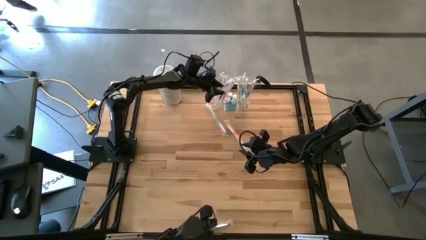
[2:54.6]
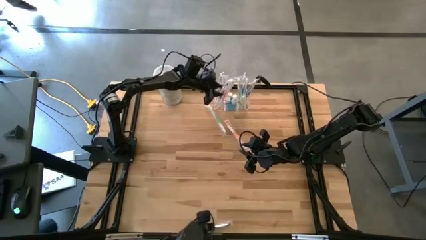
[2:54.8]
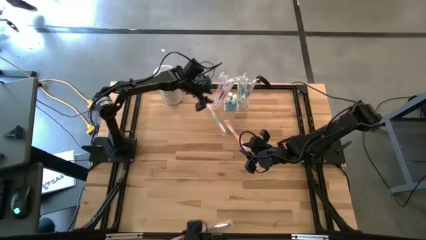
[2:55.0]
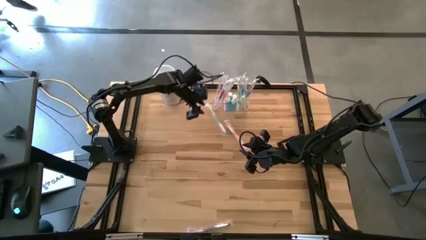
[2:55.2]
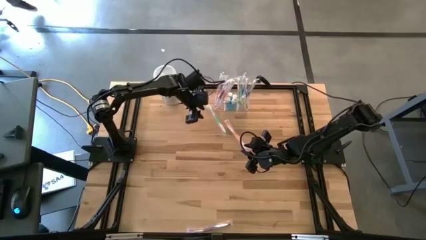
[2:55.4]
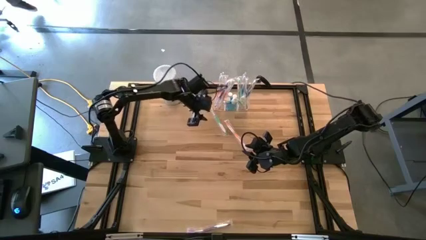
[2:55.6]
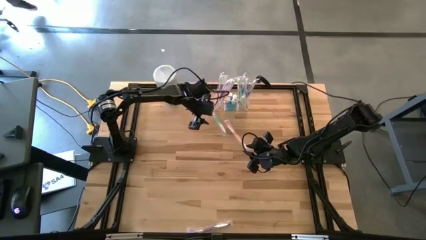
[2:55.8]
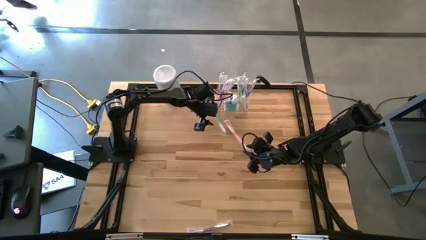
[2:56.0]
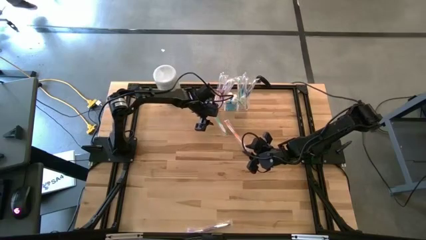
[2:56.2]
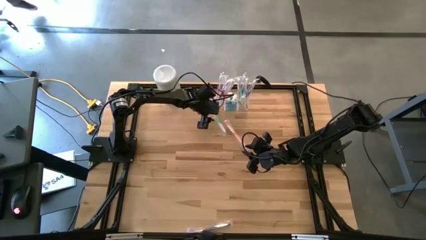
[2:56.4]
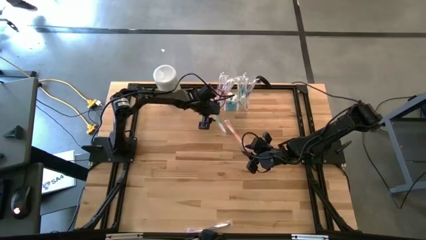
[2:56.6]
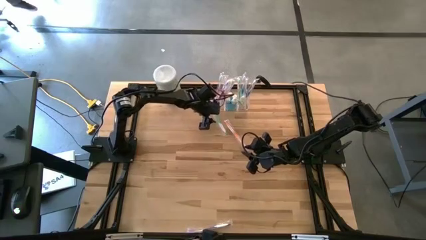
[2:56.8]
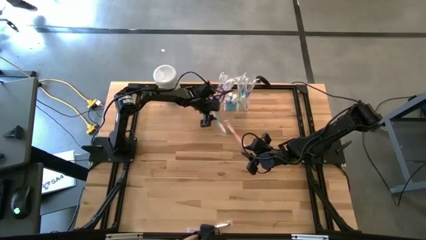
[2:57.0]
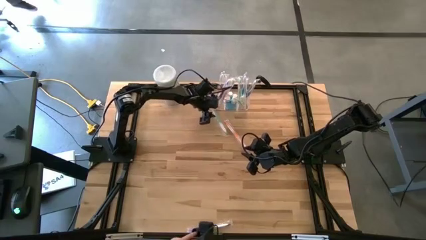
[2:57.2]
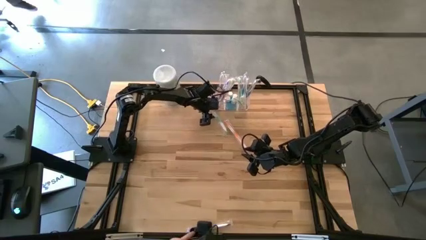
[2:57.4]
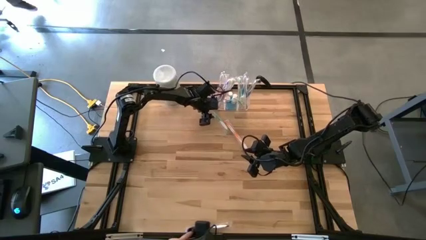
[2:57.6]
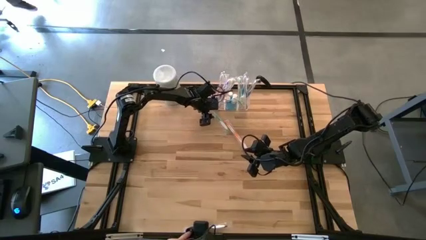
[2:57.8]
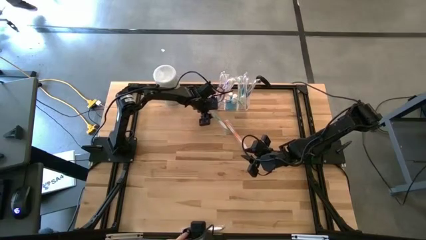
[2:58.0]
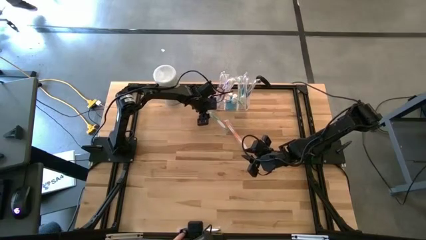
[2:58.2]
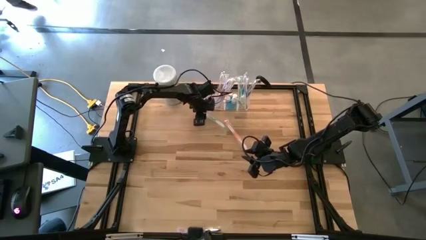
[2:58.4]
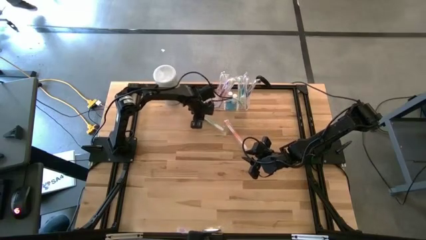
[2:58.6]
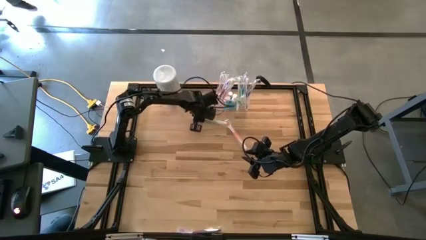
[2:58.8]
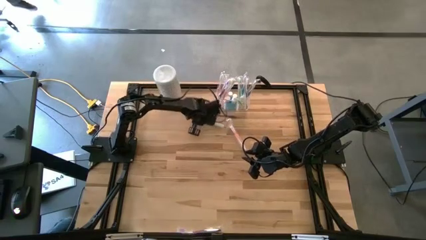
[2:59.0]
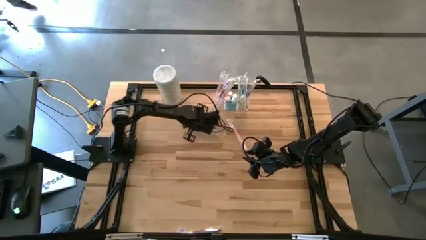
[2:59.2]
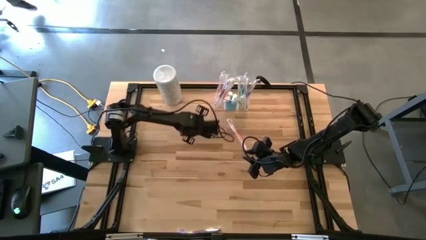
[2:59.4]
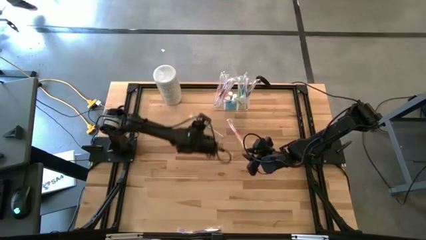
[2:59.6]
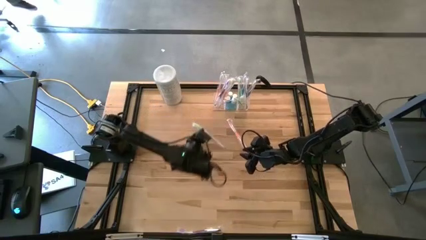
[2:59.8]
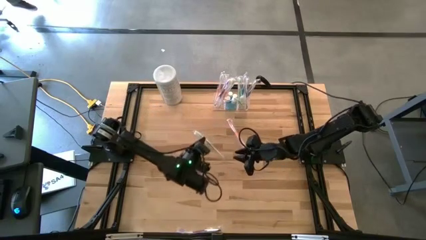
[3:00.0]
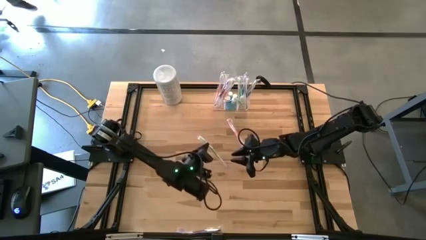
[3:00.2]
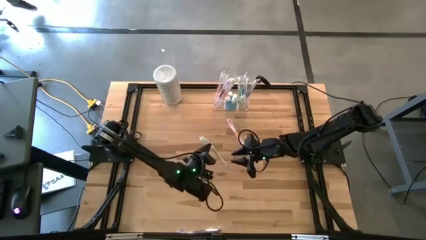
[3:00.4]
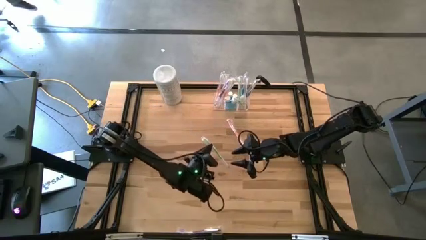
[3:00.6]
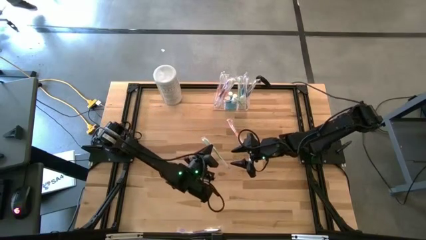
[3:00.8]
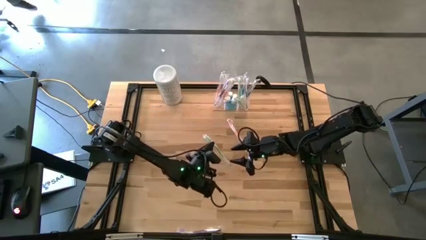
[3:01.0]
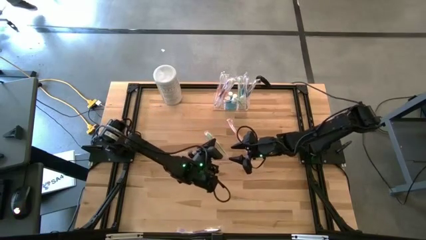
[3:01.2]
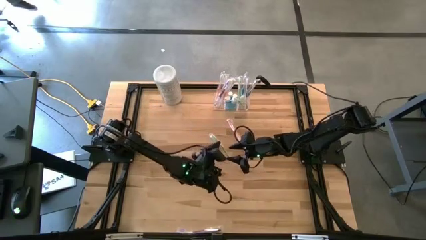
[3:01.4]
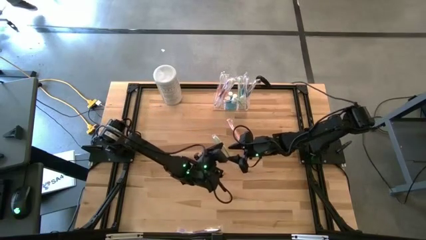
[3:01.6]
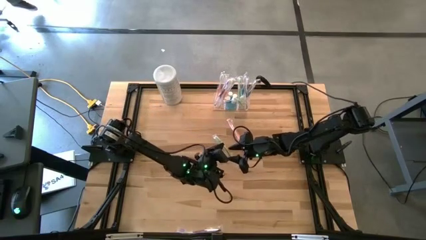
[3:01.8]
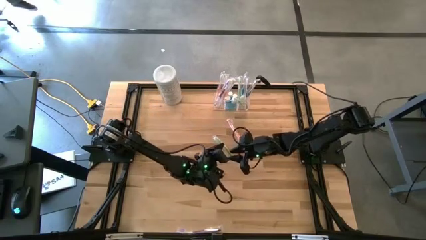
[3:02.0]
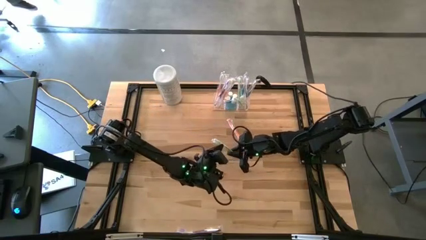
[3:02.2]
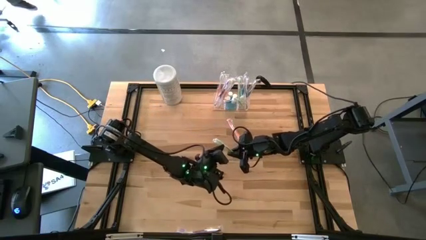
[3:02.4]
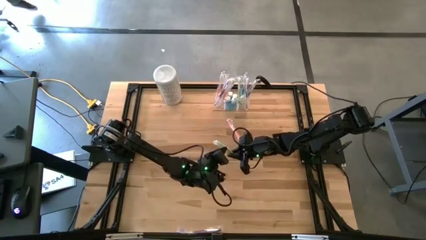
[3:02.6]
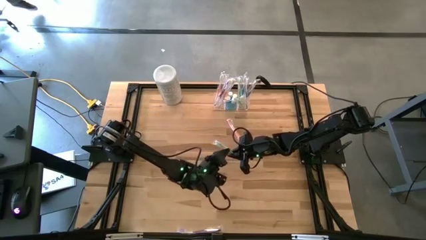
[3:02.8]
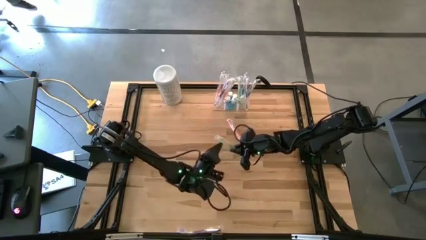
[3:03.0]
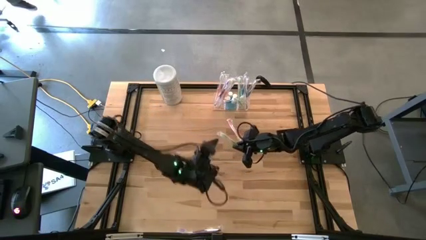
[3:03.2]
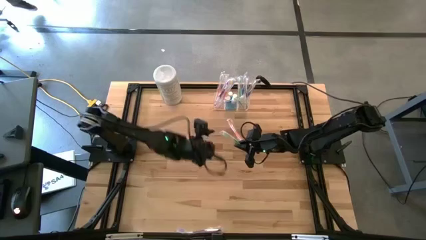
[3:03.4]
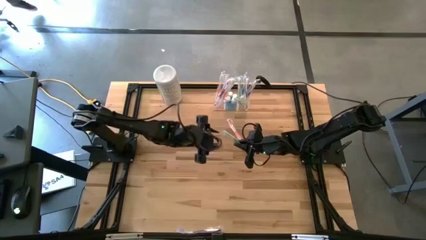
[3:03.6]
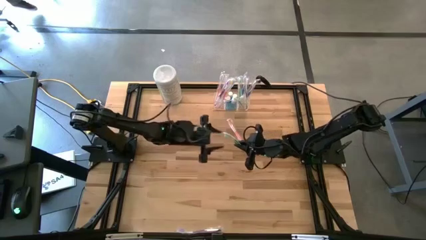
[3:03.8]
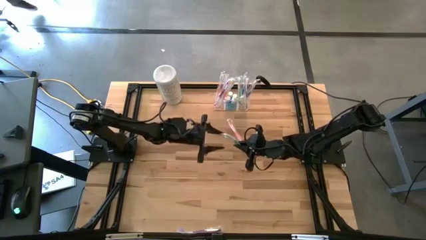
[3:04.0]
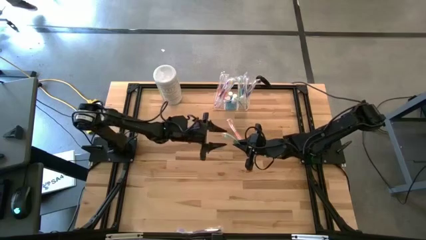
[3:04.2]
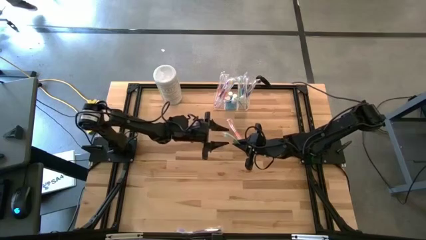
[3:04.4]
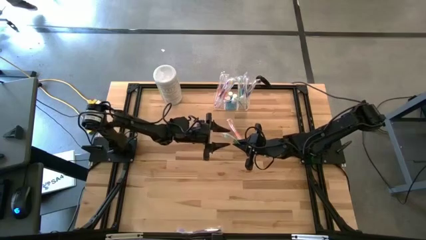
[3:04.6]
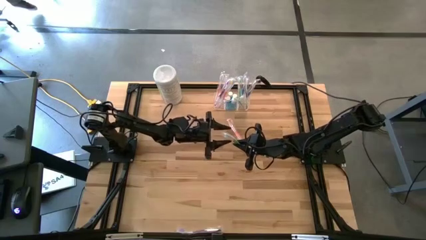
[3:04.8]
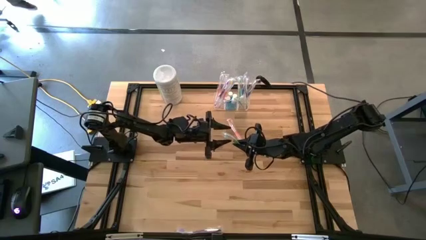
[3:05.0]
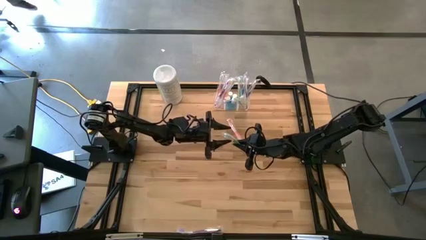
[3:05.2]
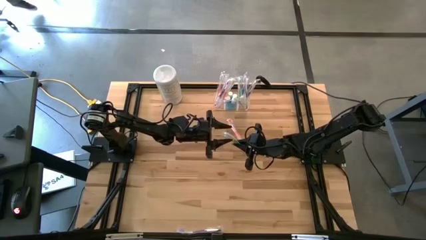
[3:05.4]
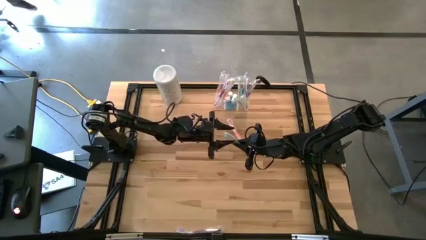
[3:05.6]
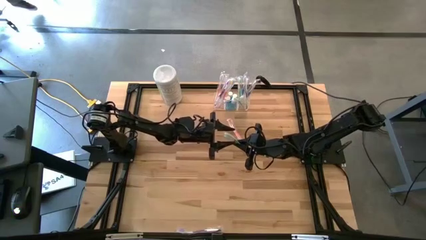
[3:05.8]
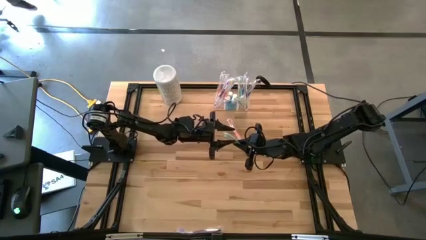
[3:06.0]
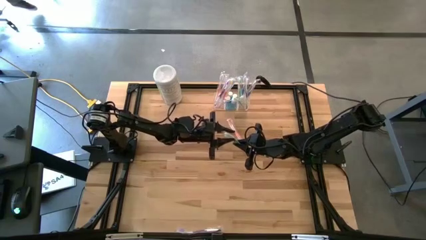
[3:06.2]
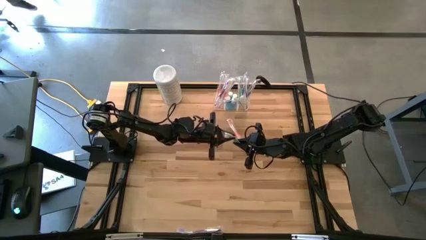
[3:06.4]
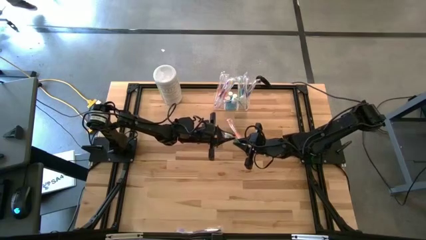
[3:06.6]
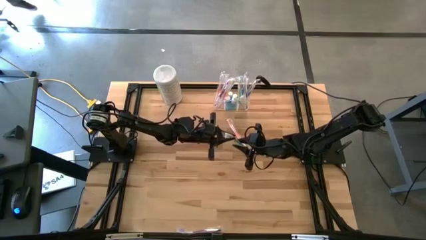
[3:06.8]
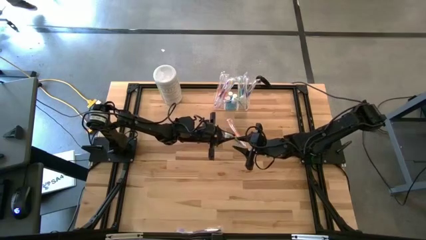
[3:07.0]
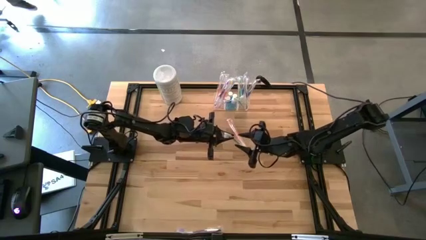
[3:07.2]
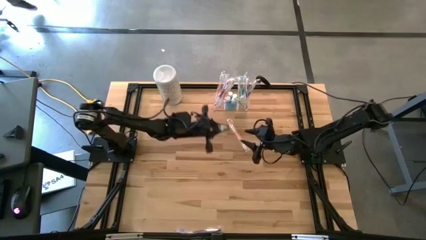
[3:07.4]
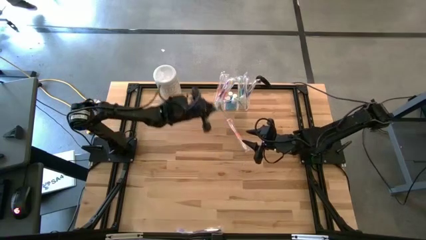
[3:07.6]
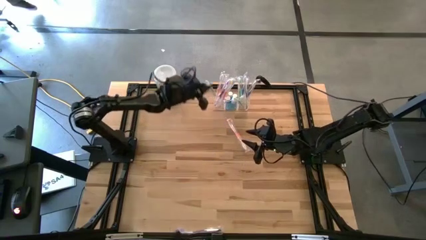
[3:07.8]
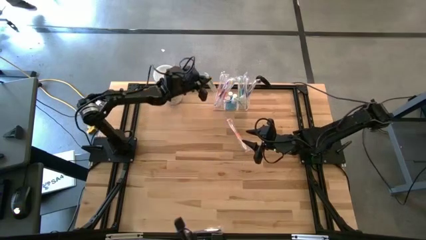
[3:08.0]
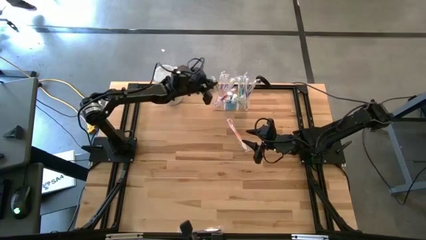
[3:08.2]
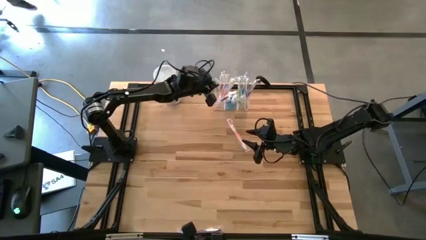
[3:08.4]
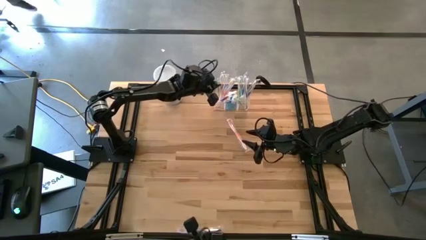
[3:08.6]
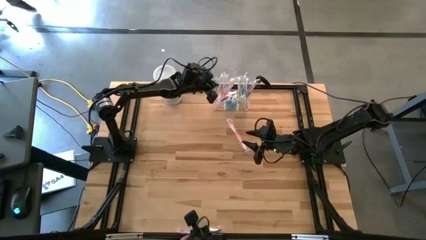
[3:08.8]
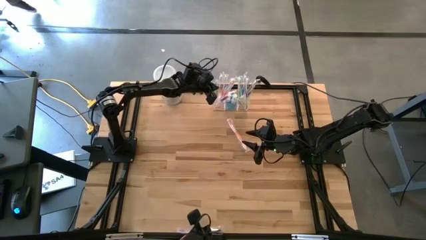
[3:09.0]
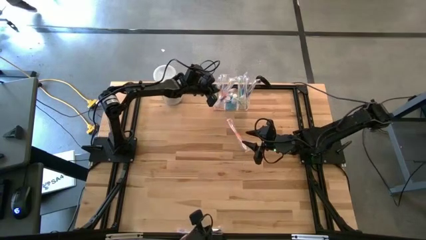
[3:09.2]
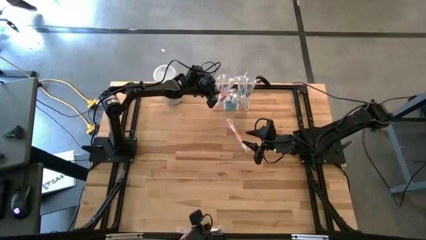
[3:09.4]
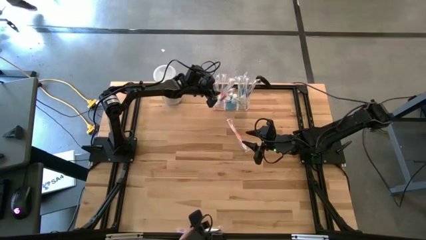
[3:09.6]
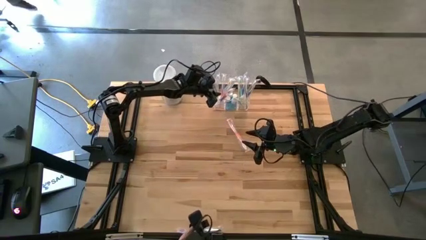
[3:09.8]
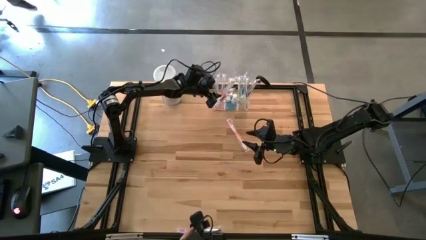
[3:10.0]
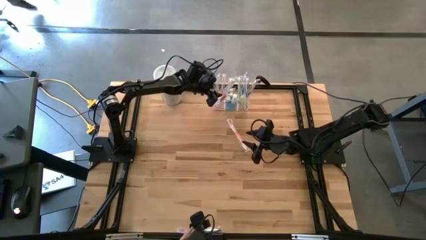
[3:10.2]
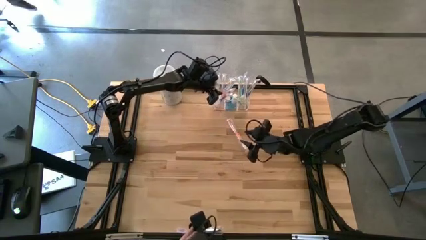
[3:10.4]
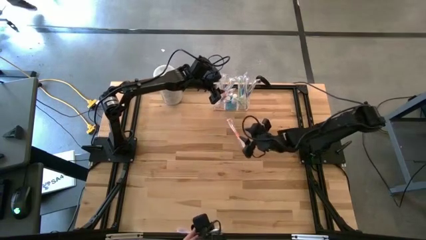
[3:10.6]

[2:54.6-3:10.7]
Task: Pick & Place toothbrushing station
Put the green toothbrush into the transparent organizer

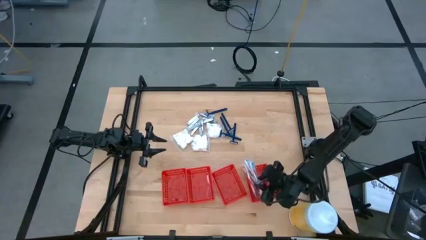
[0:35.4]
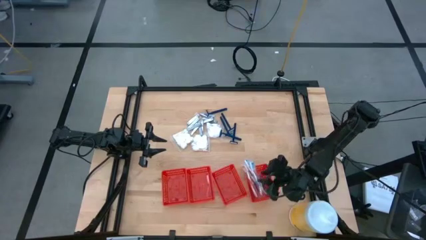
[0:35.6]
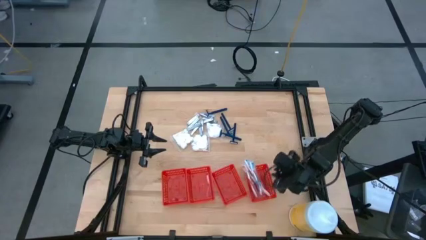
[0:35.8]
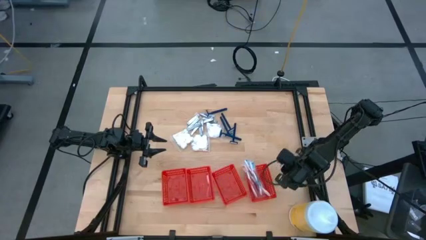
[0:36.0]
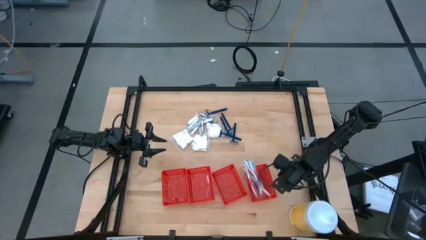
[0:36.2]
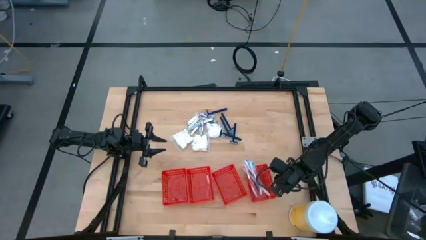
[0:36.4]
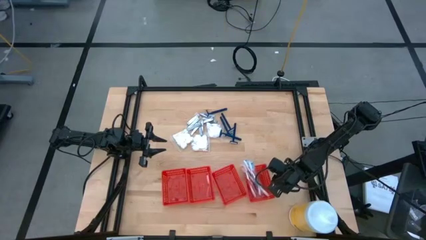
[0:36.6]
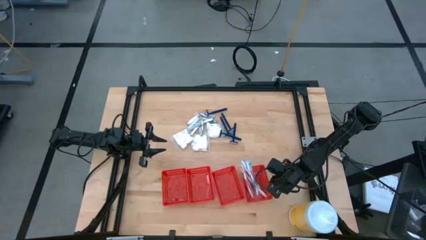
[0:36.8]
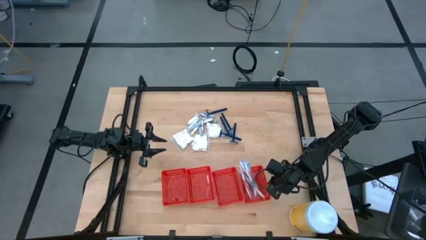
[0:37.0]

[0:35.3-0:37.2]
Task: Pick & Place Travel size toiletries
Adjust the right red bin
